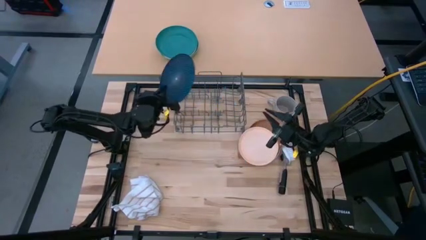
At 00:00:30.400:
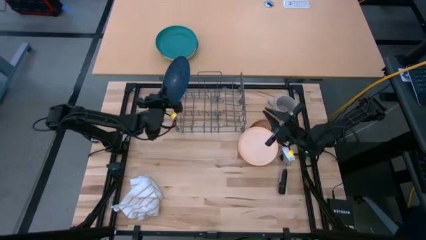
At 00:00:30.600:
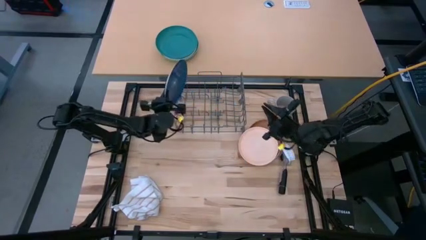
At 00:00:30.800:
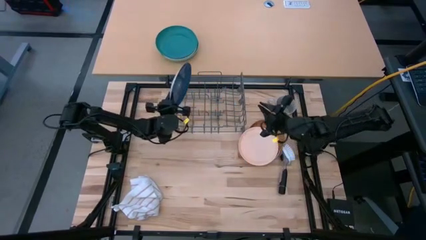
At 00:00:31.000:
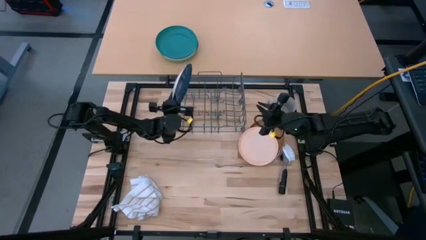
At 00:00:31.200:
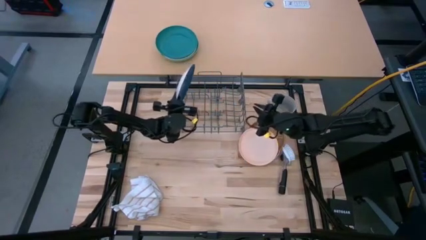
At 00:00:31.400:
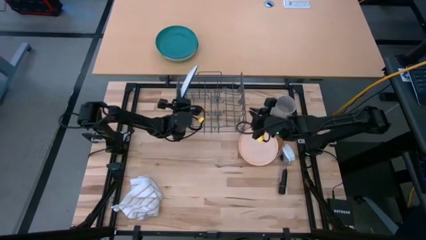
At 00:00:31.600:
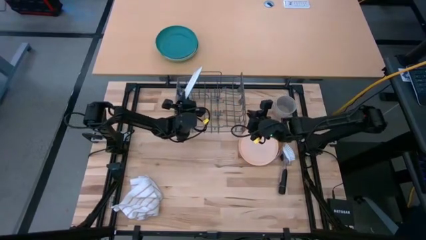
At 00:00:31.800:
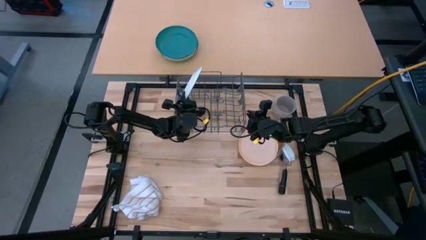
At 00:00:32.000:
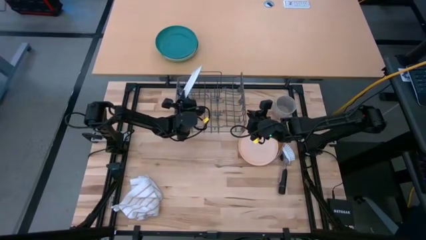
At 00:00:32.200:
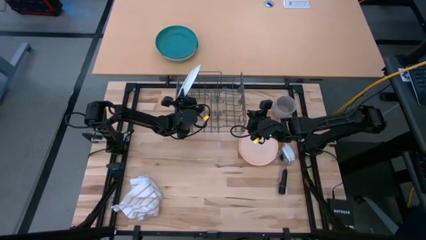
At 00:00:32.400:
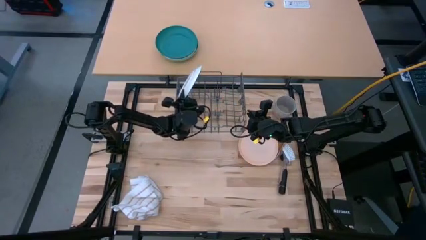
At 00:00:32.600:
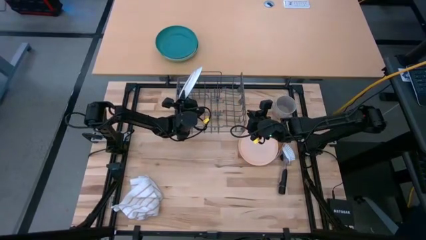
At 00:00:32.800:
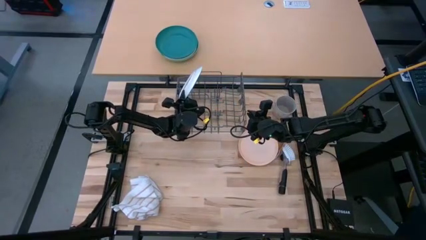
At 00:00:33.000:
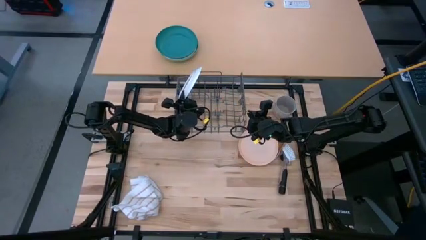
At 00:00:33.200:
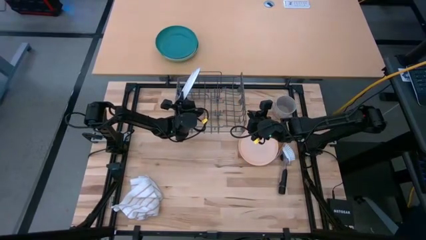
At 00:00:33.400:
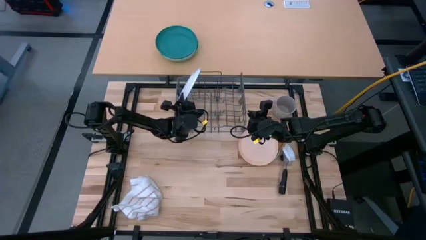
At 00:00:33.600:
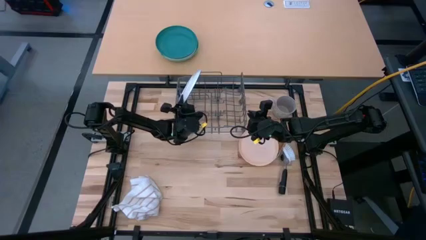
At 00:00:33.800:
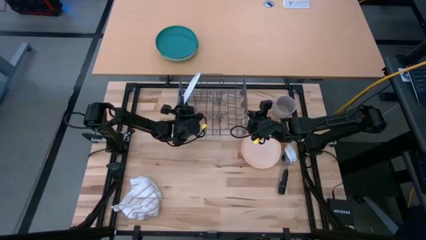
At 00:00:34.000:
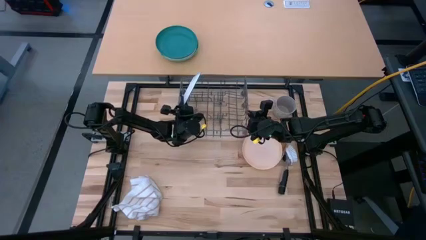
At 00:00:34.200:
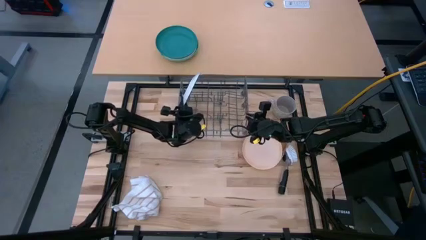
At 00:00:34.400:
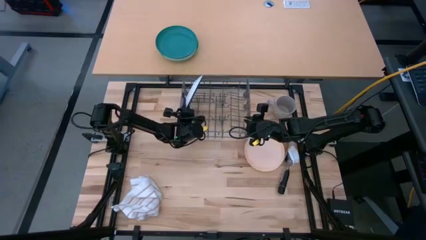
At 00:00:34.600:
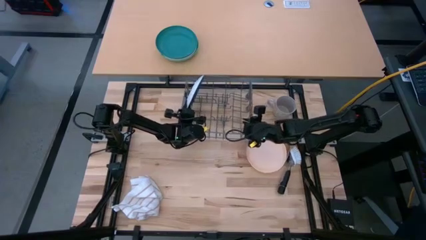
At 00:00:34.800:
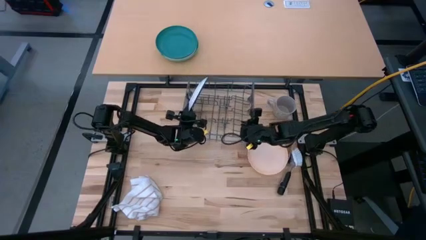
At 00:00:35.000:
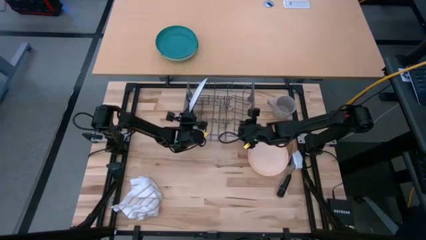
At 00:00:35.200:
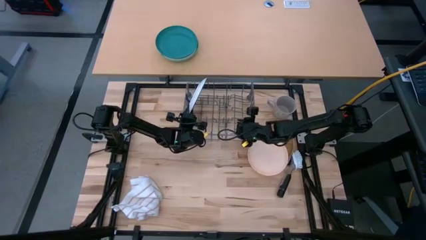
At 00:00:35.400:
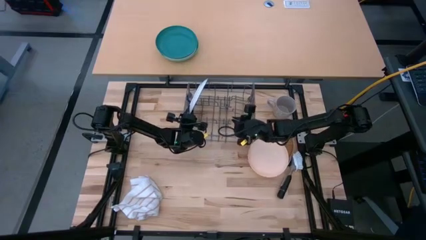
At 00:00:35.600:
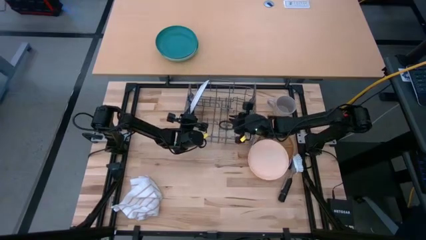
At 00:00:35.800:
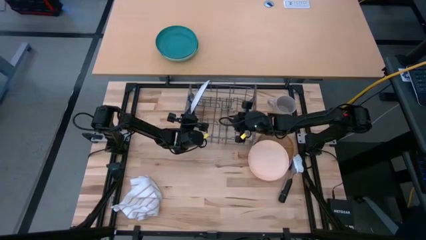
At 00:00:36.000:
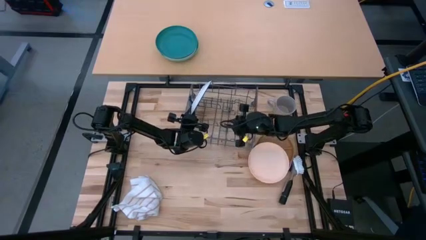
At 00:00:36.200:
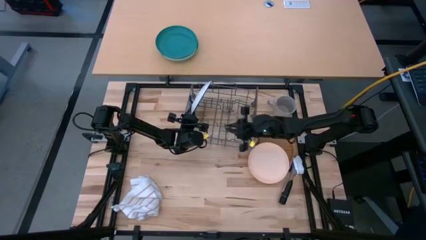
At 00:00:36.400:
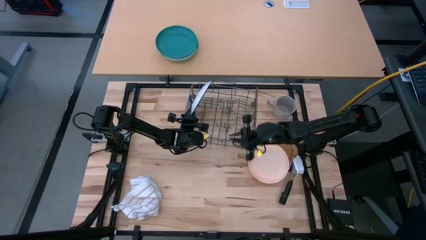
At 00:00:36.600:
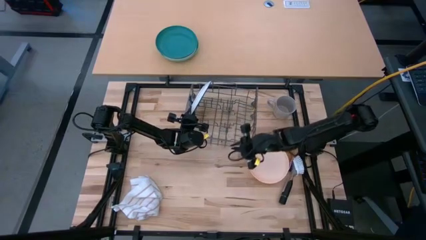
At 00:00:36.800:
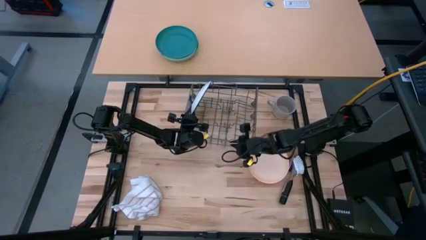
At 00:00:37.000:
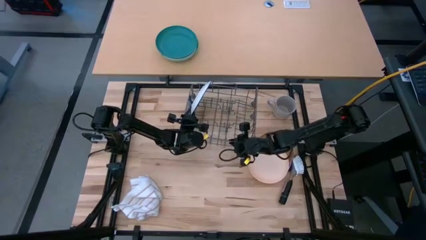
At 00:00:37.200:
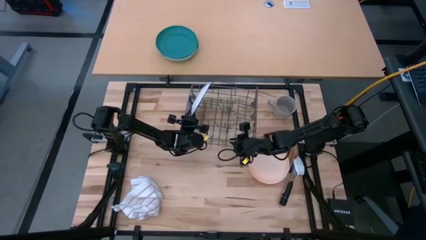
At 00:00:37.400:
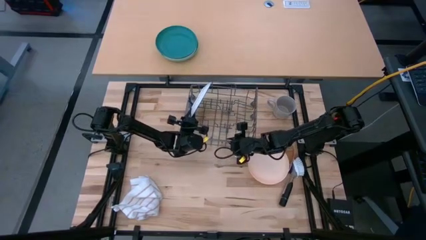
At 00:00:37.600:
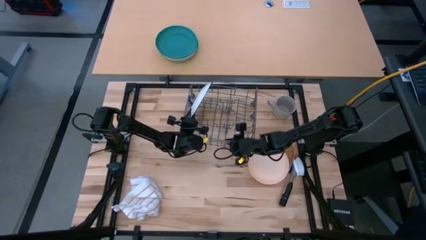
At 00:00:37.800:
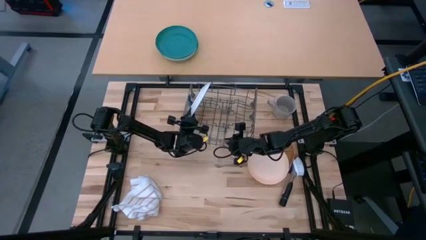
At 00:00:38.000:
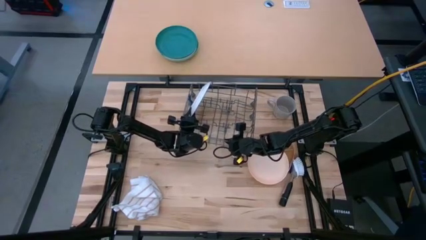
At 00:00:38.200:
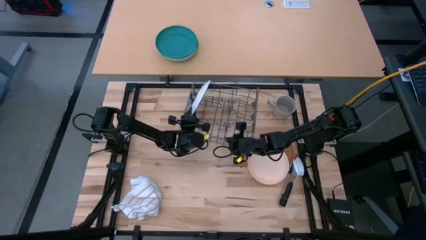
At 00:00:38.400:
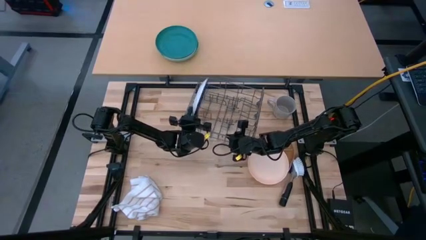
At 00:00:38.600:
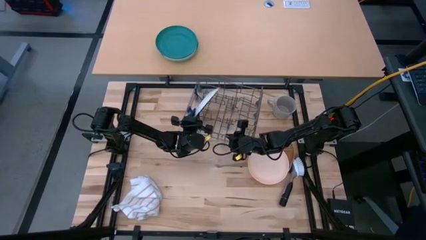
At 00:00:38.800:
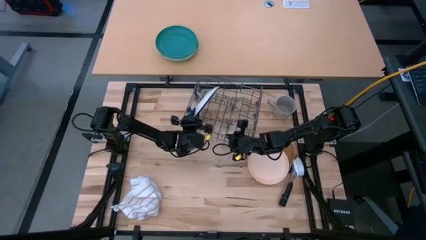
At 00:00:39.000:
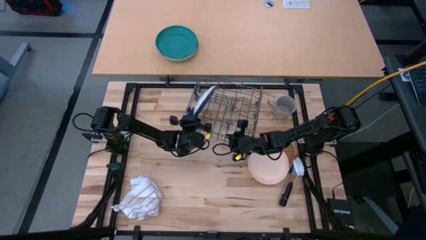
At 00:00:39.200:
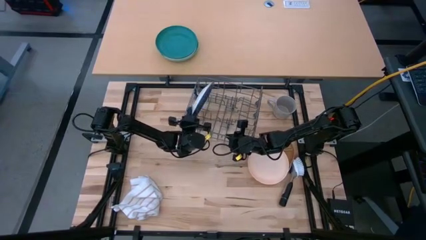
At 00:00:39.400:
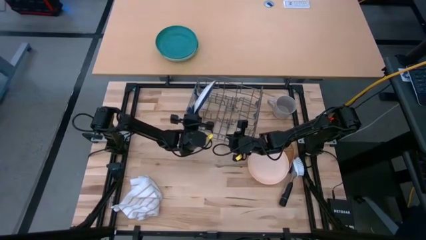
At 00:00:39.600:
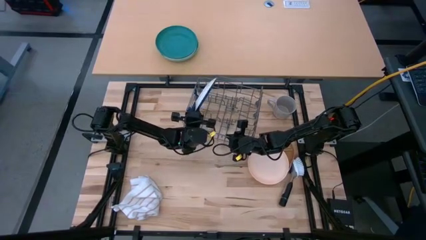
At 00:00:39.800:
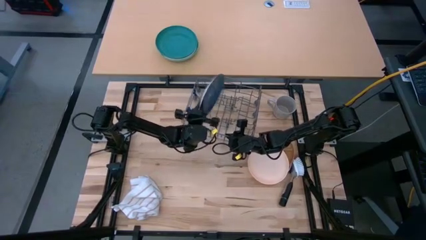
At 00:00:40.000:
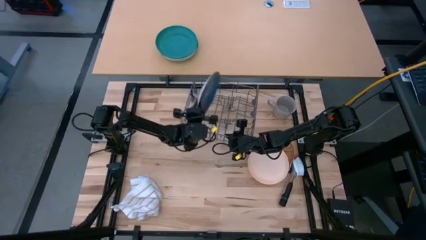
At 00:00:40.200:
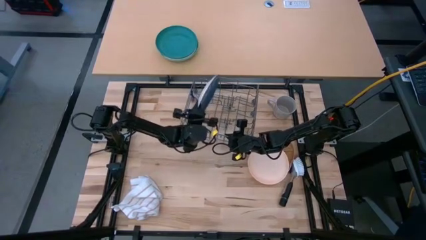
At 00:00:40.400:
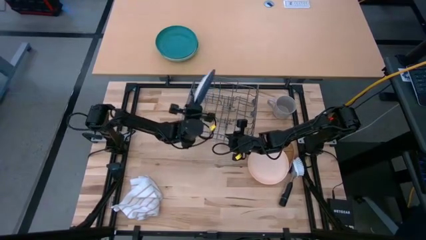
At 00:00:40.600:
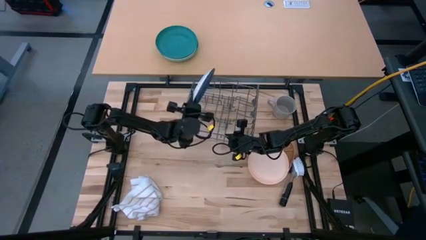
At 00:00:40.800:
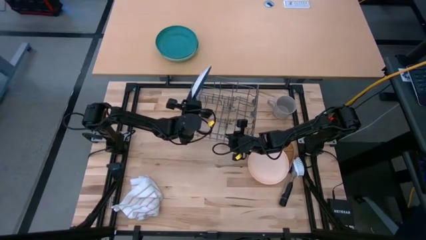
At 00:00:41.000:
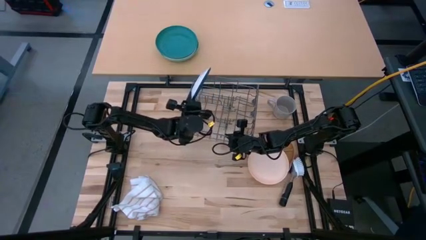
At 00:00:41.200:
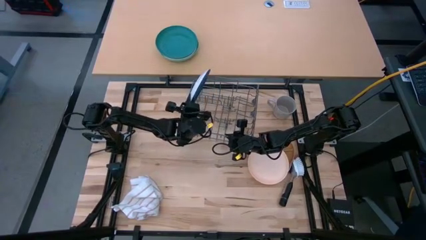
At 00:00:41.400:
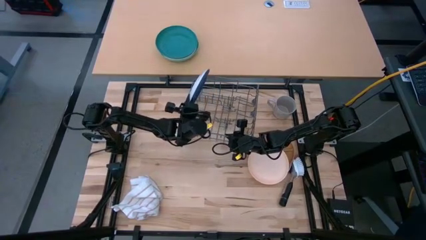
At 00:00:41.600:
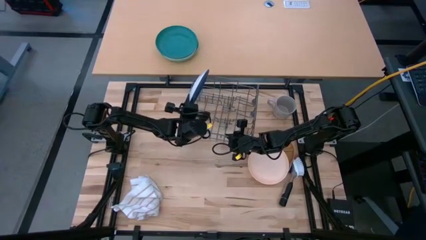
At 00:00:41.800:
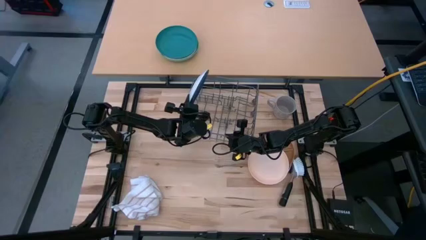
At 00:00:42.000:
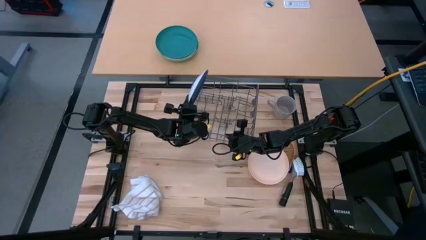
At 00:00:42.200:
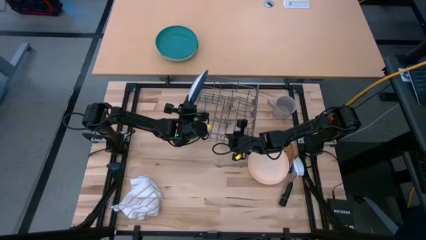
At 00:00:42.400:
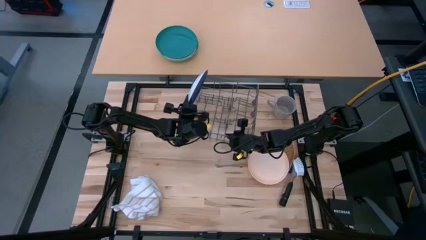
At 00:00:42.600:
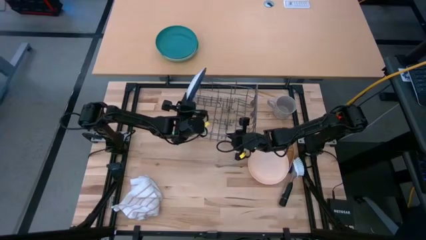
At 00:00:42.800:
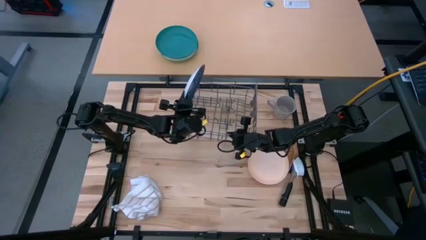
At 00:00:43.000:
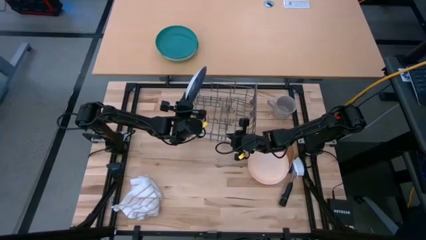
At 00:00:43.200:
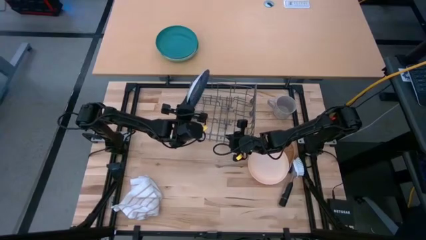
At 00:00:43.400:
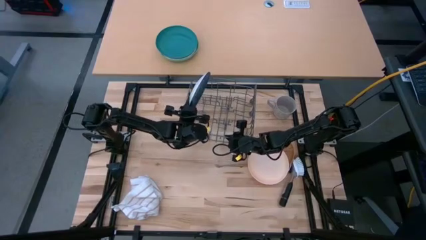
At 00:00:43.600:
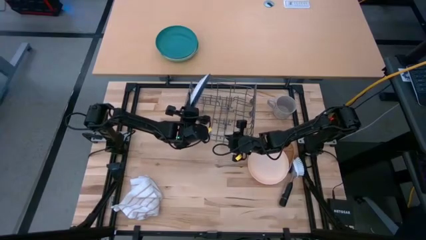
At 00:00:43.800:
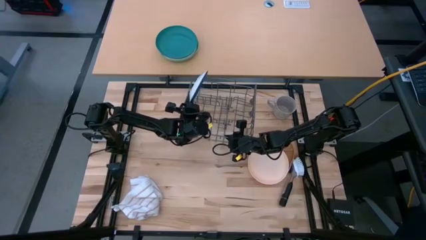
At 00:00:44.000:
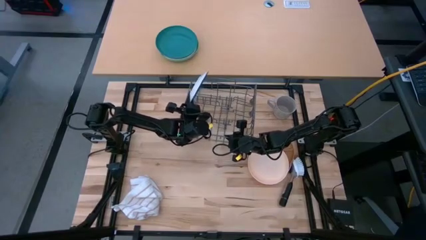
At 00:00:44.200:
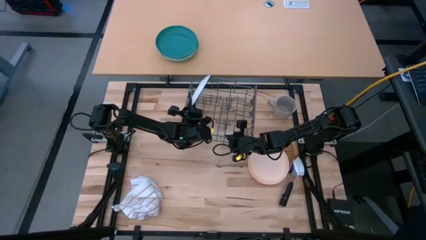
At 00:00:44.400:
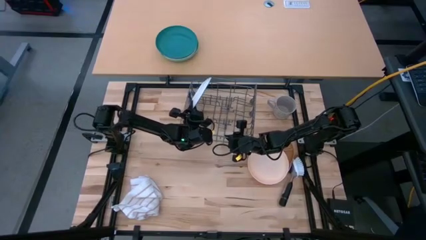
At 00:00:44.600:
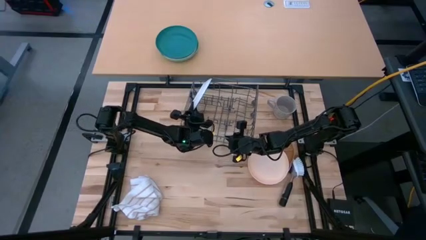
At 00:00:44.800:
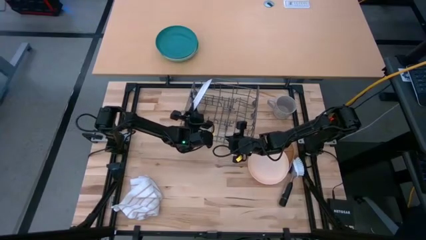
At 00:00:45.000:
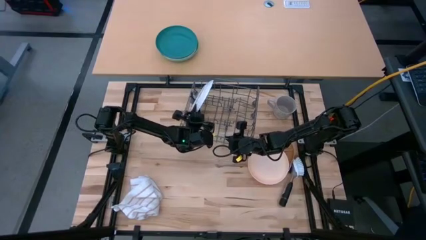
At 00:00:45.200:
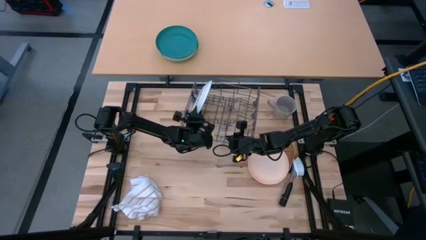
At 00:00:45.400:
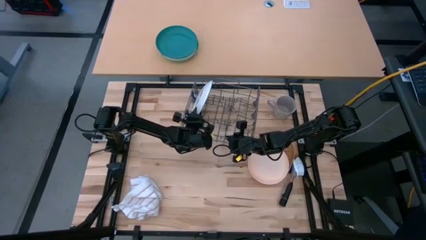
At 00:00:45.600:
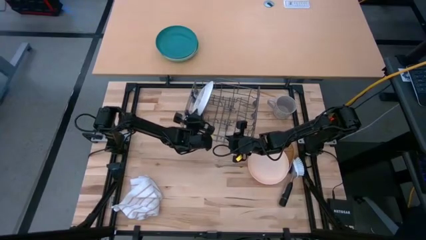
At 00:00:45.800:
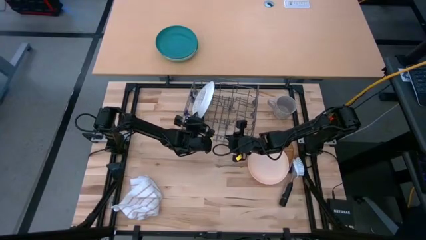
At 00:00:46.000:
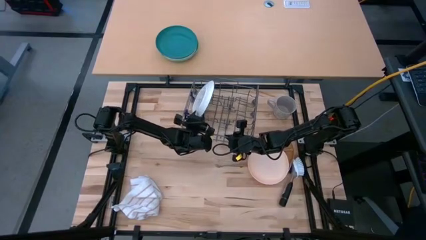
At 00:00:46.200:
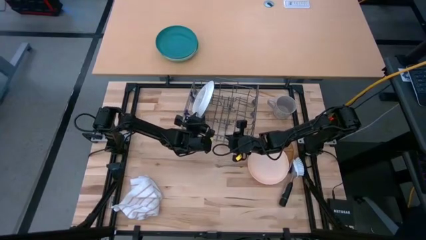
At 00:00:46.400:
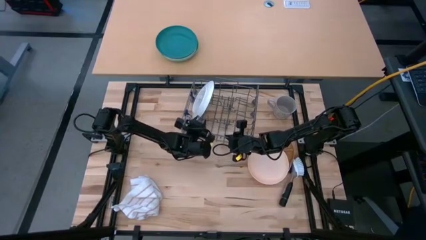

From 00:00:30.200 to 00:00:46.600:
Task: Sort dishes
Put the blue plate in the dish rack
